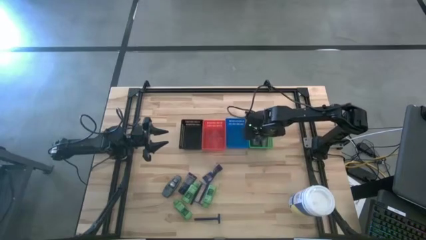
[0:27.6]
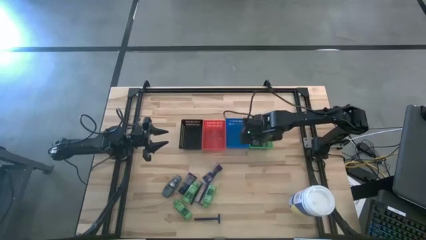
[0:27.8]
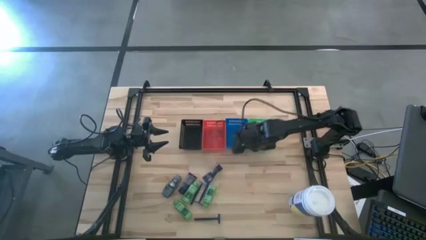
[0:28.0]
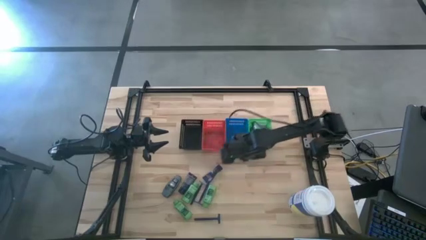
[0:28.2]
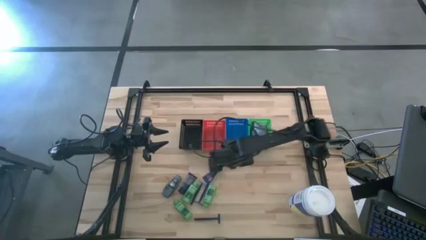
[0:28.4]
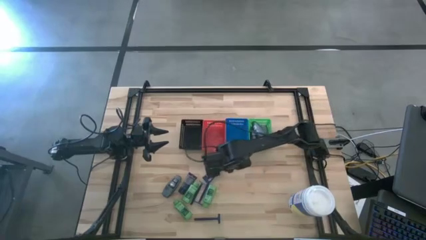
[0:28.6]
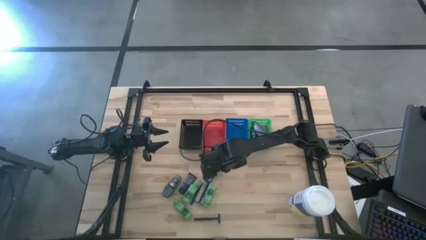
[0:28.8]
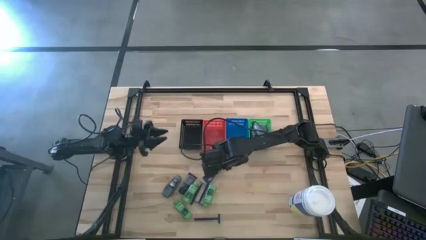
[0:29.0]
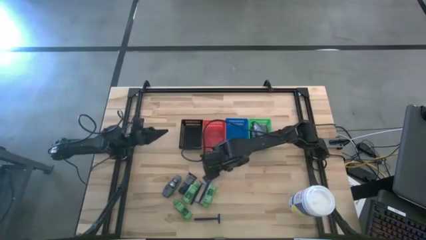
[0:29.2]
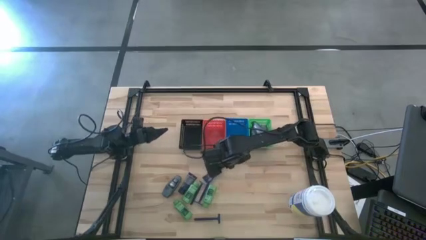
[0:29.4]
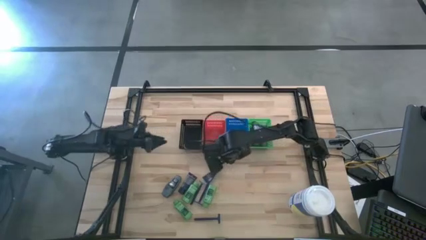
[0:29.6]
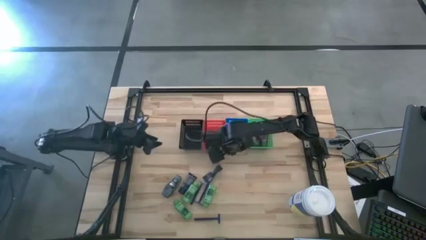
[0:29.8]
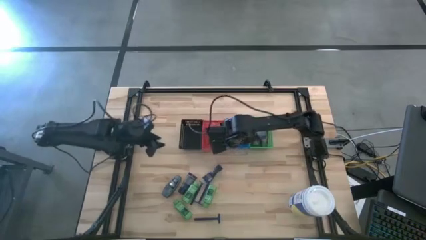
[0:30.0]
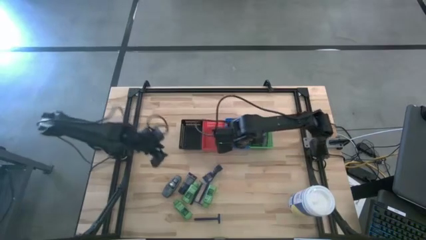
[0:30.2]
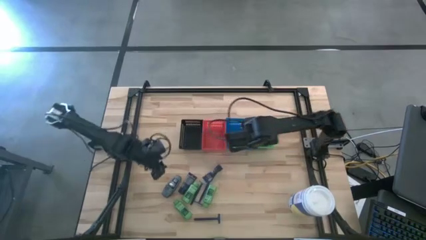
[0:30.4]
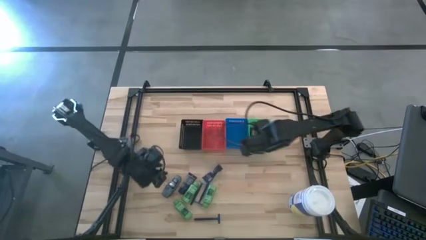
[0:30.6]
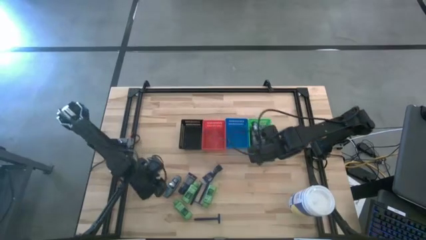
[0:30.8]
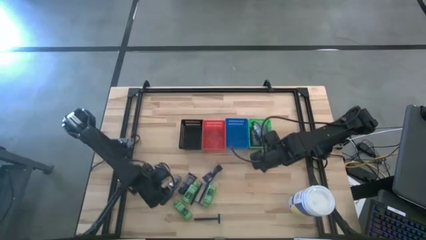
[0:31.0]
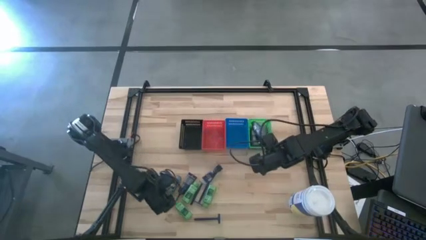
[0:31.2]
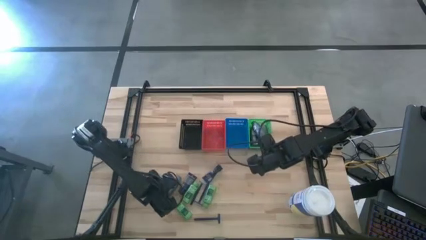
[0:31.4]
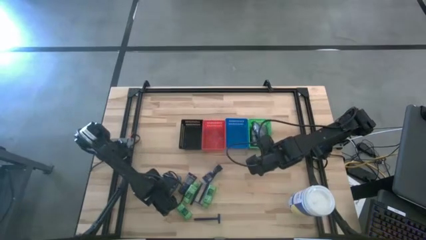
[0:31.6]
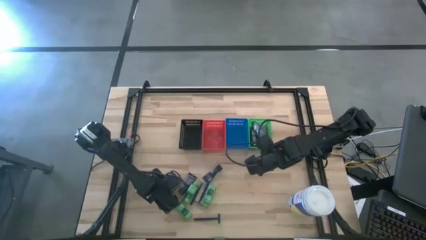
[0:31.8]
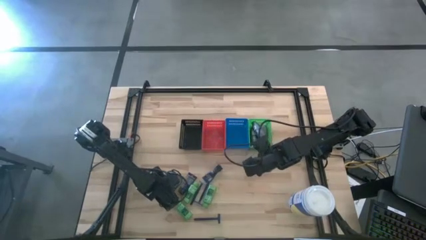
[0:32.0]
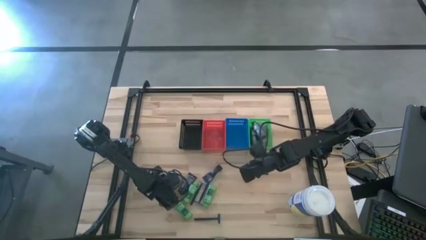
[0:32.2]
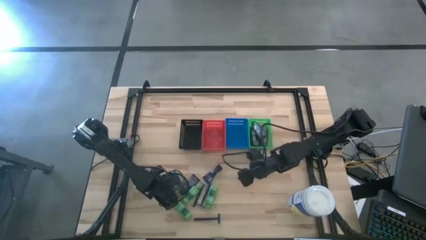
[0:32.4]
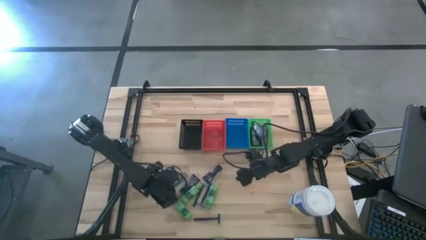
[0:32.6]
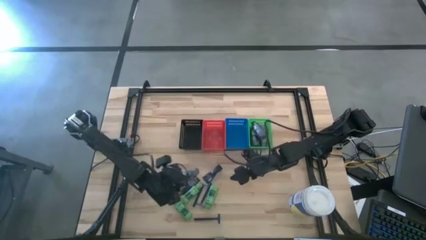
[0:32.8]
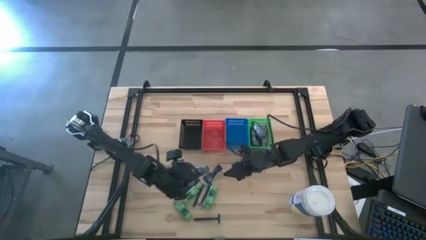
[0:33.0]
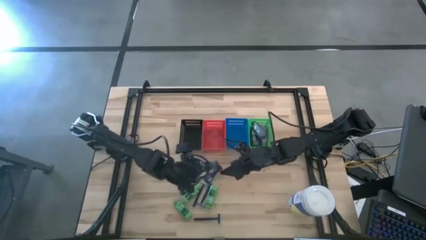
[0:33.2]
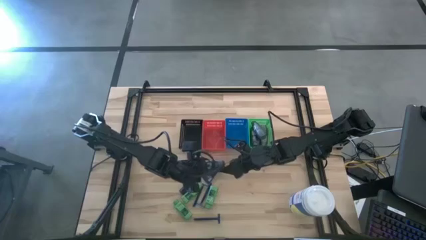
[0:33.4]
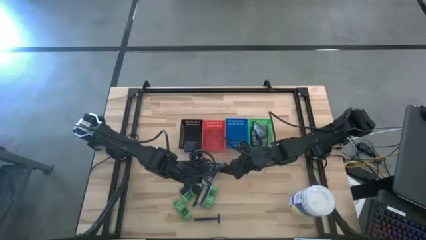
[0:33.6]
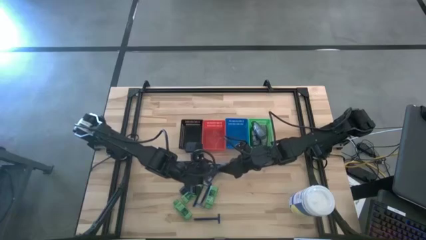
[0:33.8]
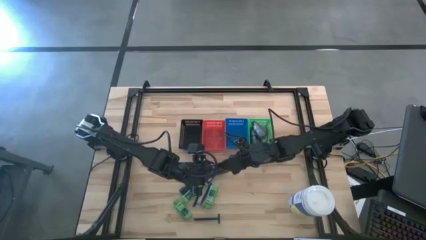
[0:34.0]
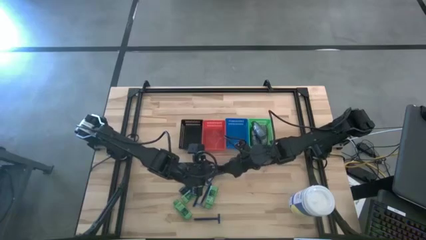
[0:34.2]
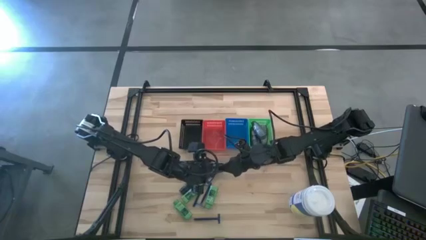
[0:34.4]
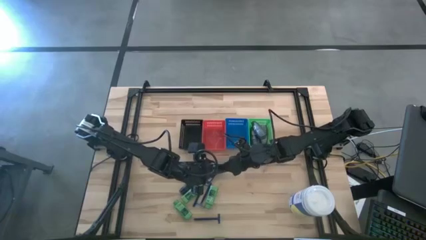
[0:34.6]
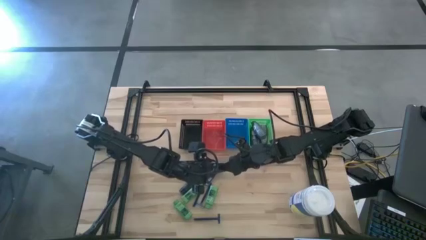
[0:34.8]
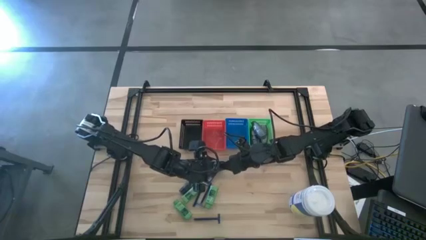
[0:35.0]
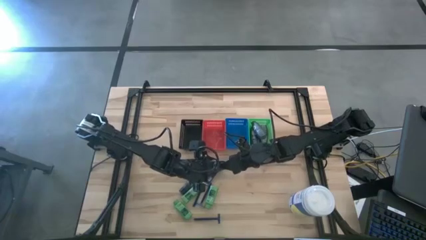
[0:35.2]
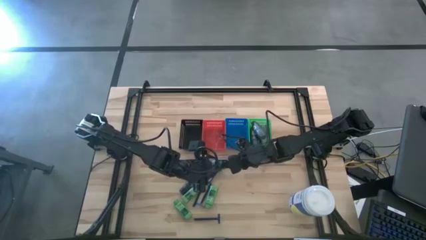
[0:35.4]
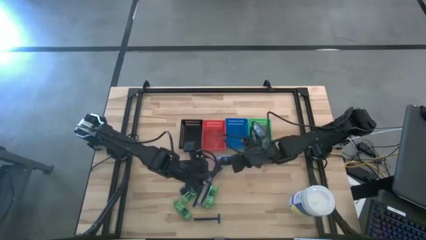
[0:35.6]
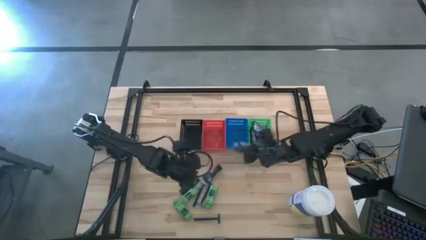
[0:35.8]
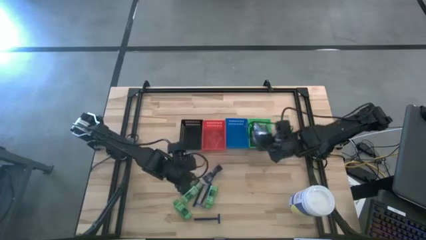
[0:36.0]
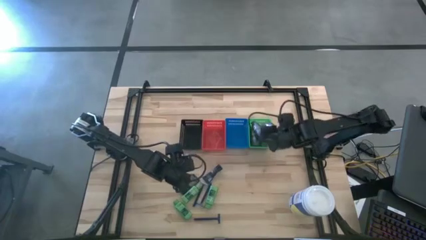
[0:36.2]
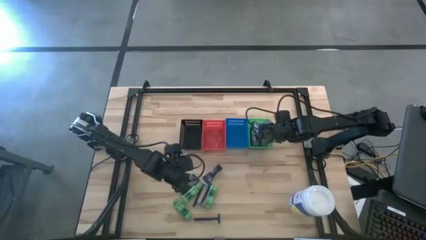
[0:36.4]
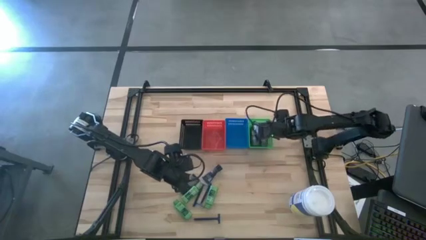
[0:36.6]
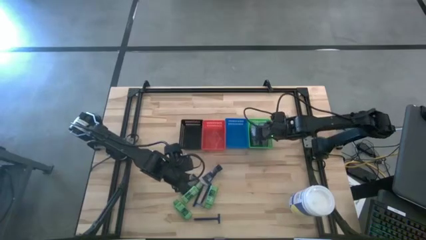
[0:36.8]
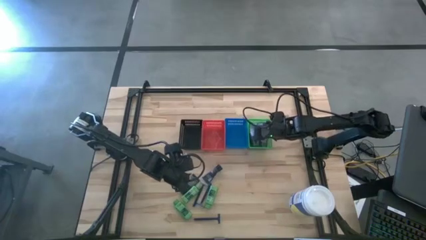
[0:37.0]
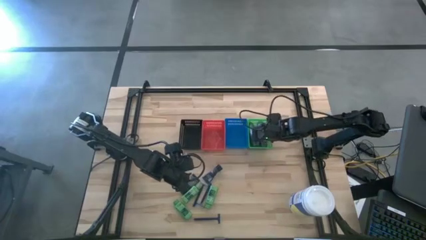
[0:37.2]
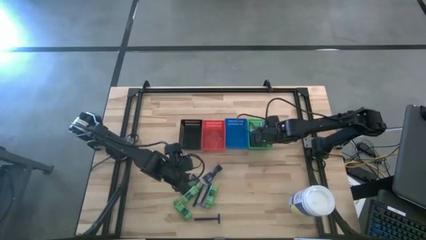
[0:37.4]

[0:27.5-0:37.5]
Task: Pick & Place Travel size toiletries
Put the black deodorant into the green basket

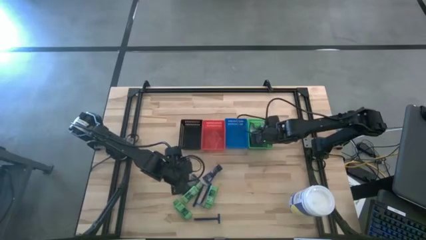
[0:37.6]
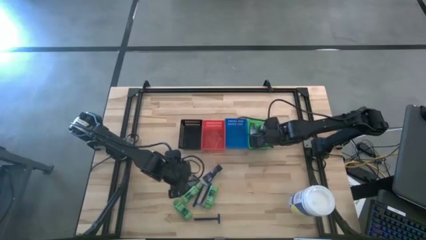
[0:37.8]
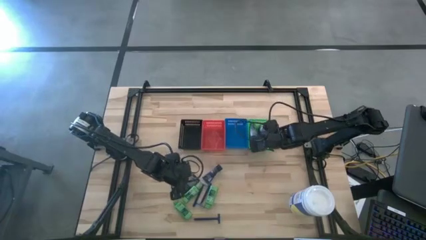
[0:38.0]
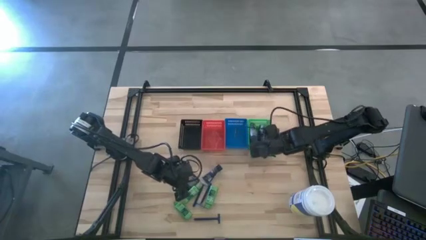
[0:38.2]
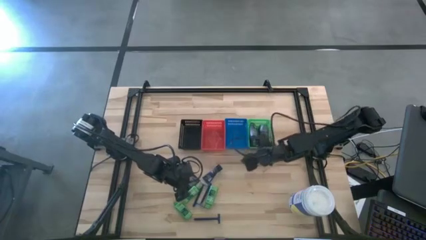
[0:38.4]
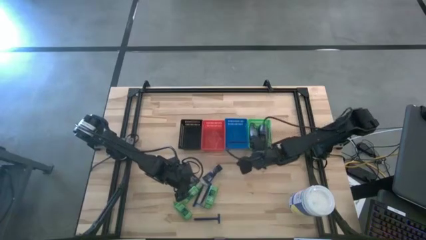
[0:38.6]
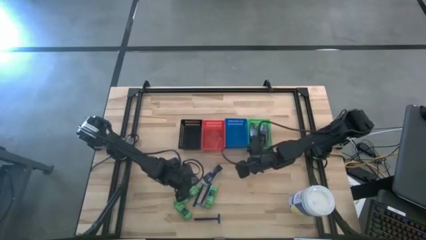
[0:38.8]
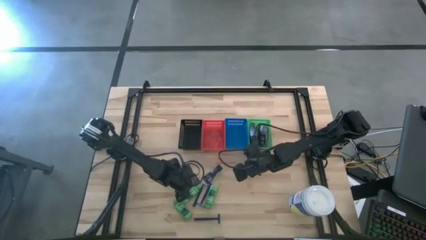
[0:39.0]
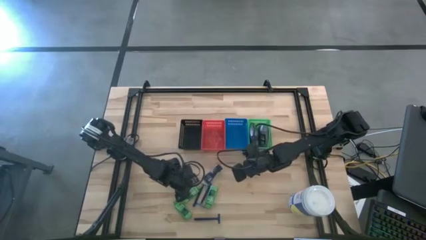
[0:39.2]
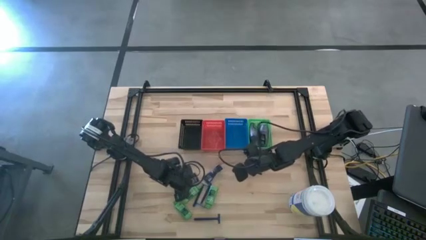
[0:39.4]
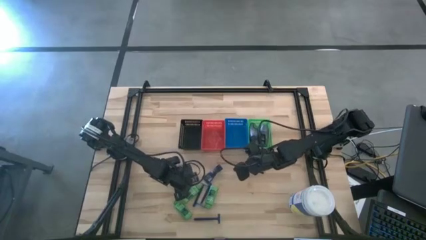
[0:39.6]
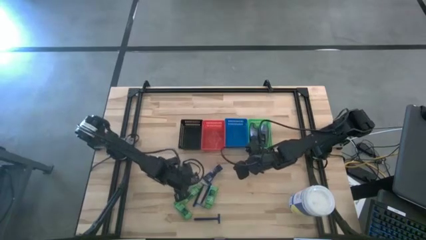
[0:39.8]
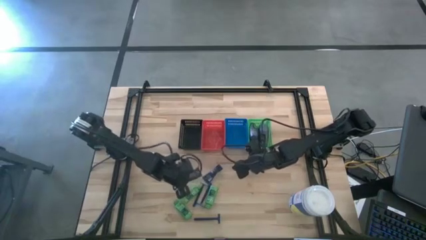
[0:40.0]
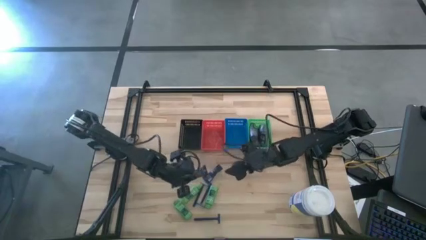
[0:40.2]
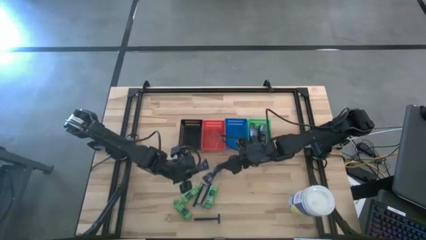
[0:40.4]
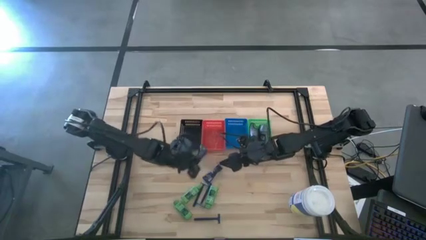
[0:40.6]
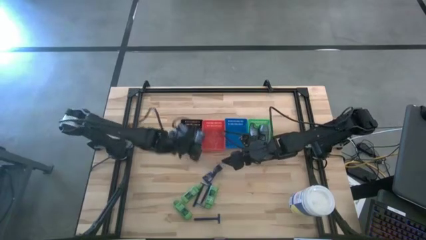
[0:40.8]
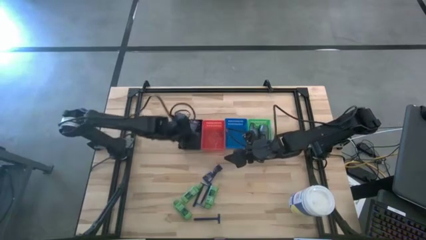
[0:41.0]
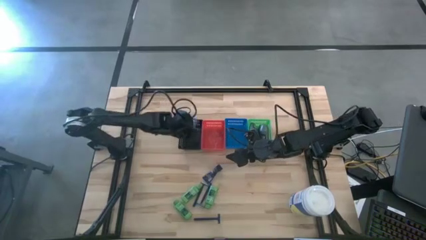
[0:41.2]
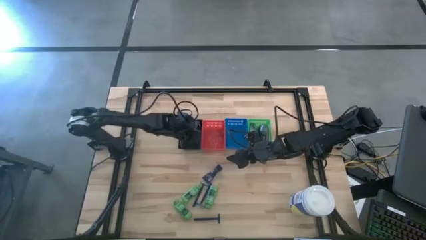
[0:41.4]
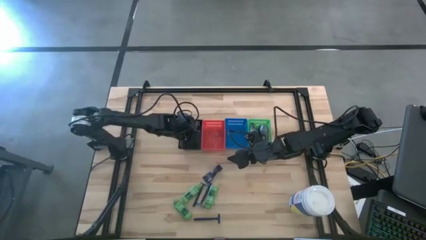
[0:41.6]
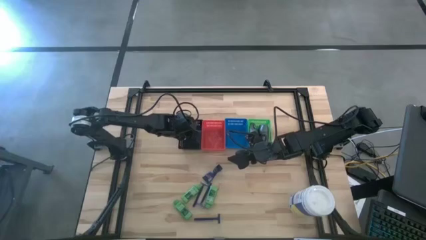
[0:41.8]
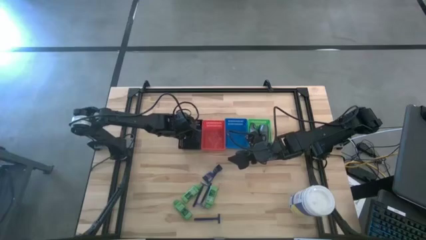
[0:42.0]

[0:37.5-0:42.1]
Put the blue shaving cream into the black basket

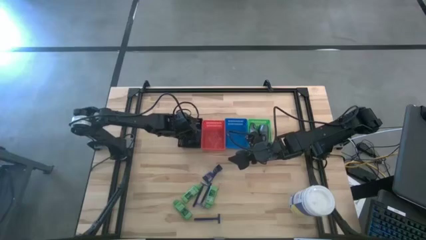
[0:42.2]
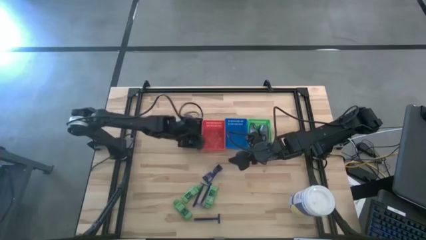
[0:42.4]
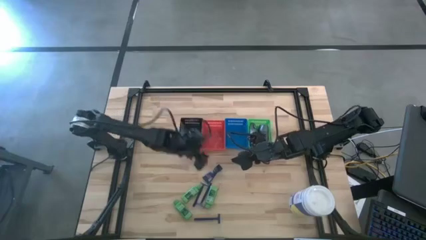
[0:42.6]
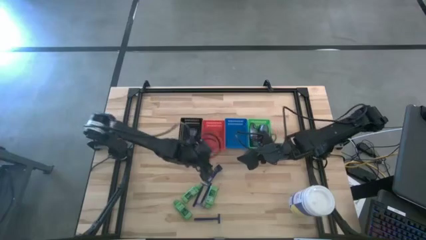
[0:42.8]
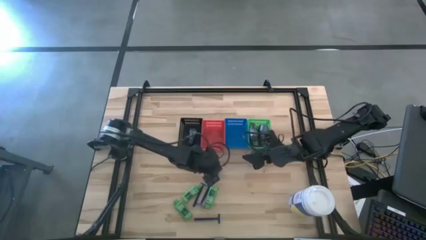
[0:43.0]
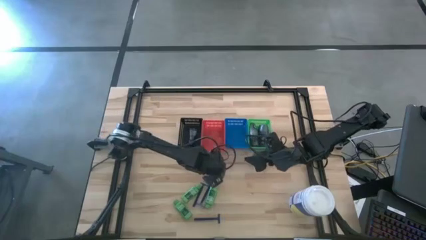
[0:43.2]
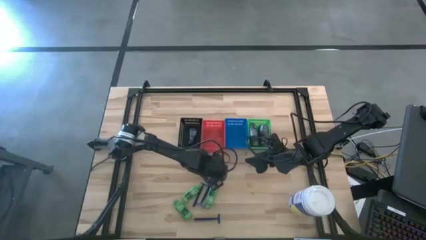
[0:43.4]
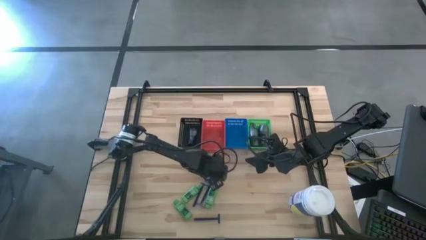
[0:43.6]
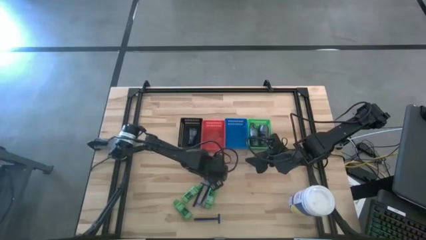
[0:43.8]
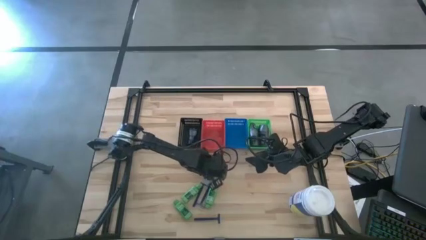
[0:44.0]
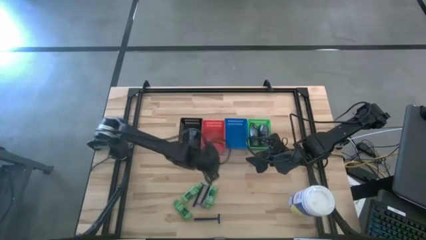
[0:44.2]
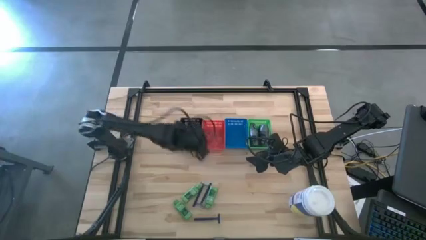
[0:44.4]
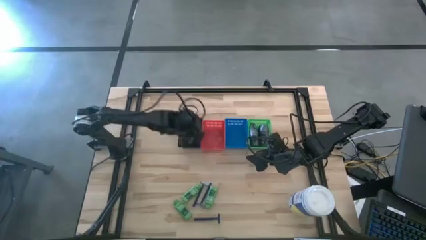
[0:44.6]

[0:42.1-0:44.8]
Put the blue shaving cream into the black basket
